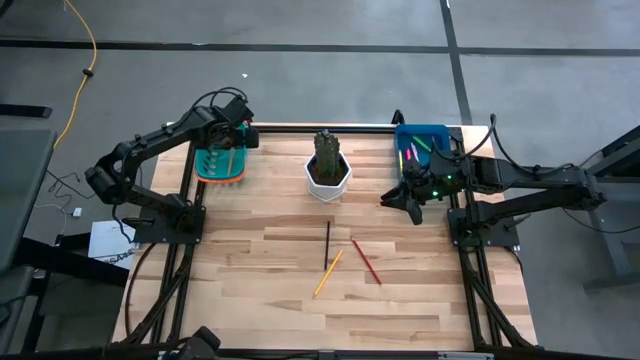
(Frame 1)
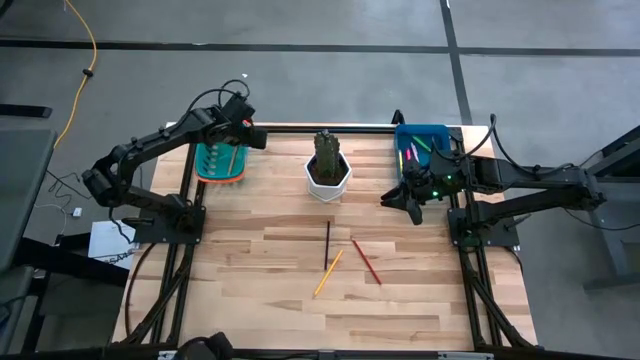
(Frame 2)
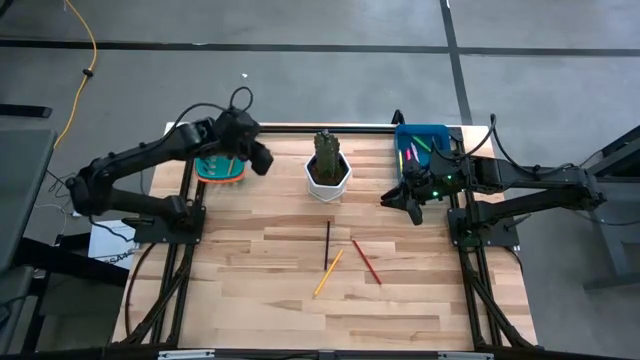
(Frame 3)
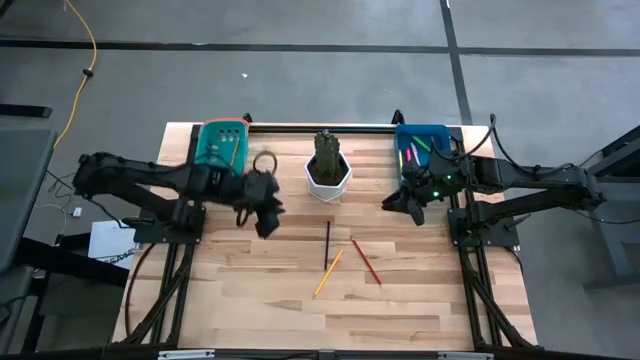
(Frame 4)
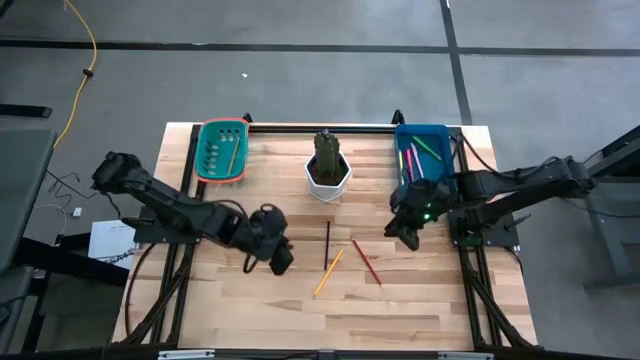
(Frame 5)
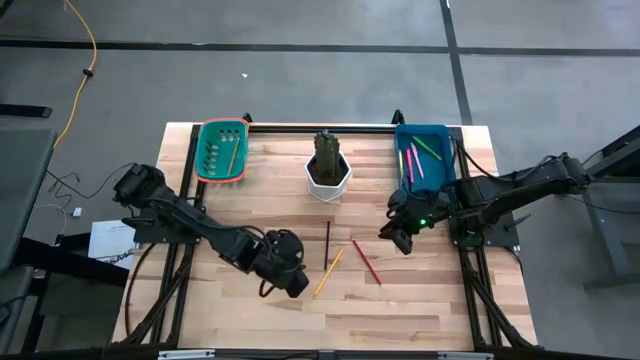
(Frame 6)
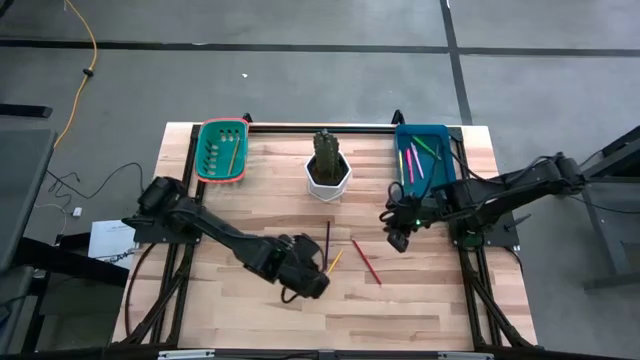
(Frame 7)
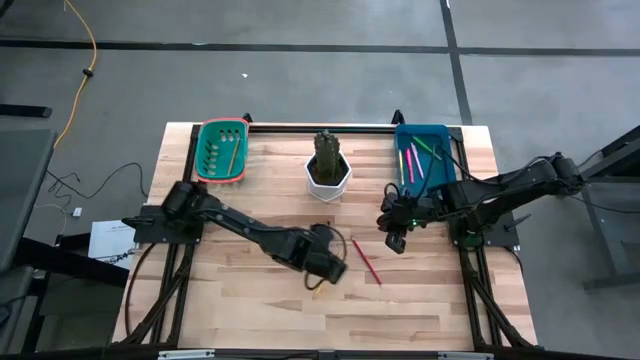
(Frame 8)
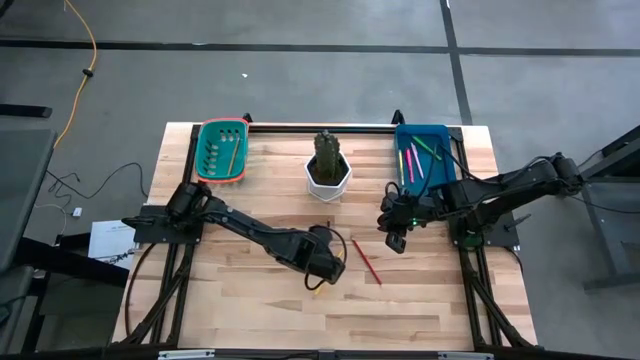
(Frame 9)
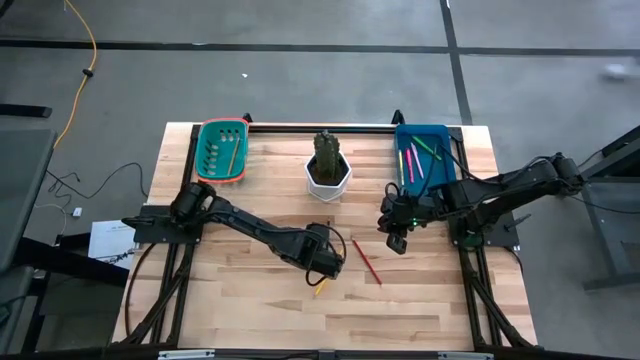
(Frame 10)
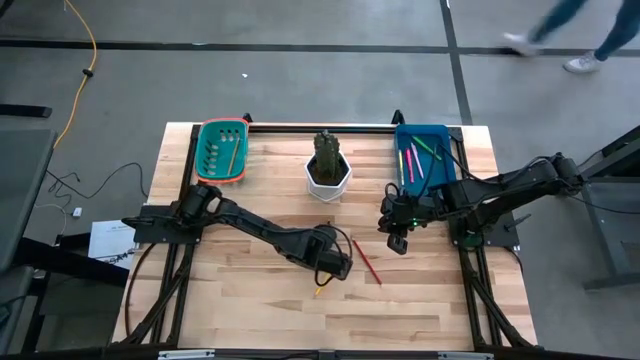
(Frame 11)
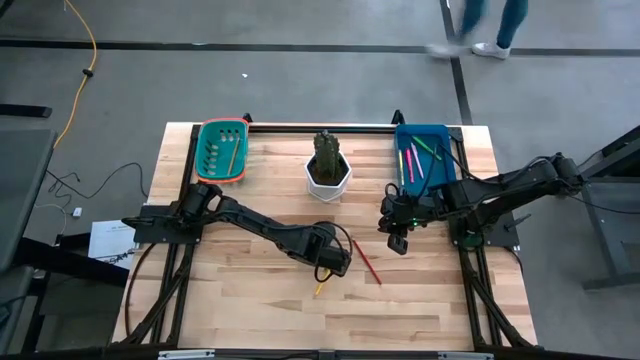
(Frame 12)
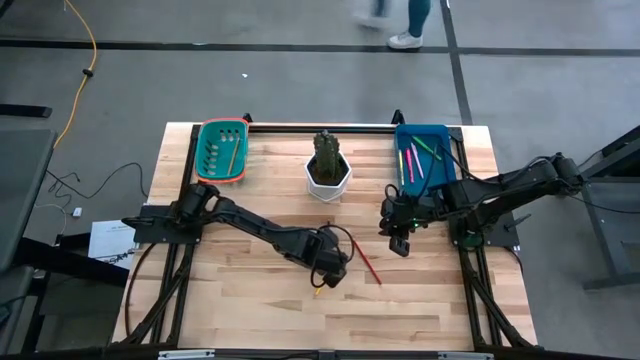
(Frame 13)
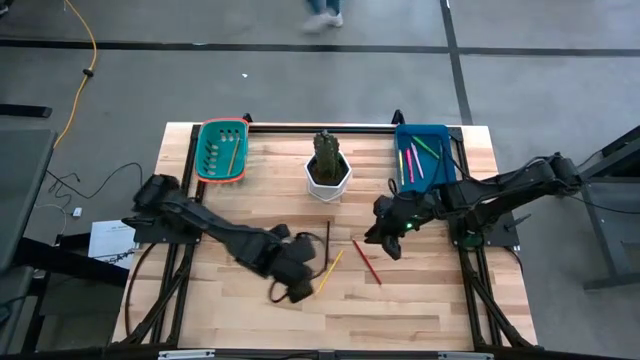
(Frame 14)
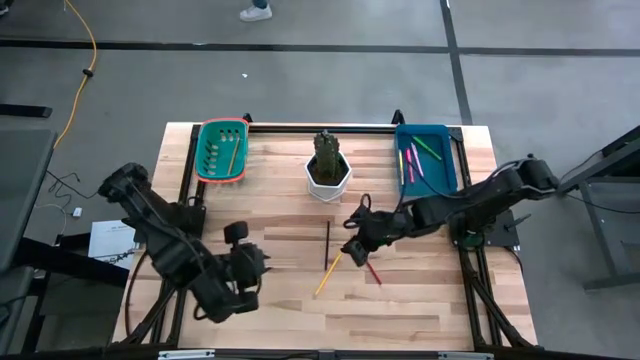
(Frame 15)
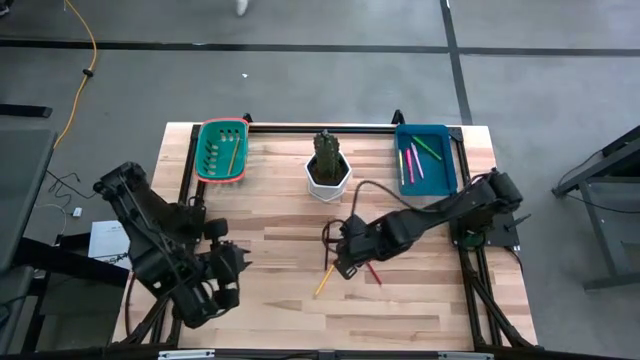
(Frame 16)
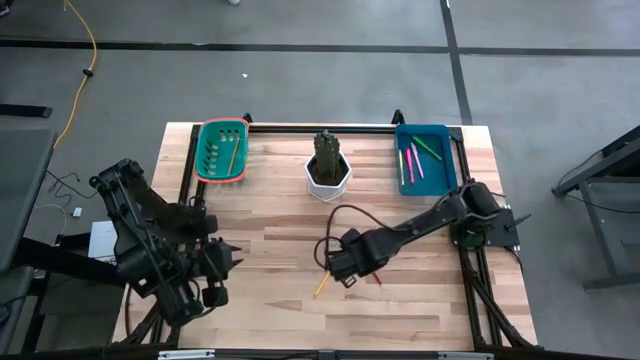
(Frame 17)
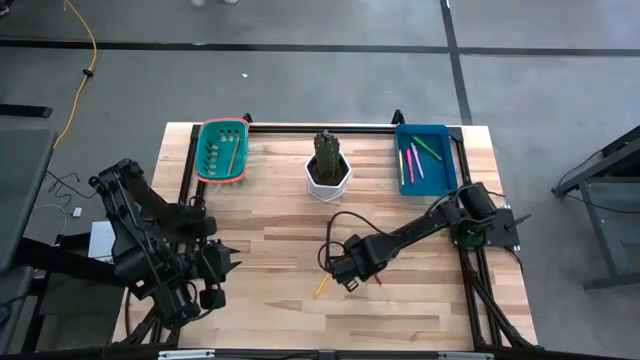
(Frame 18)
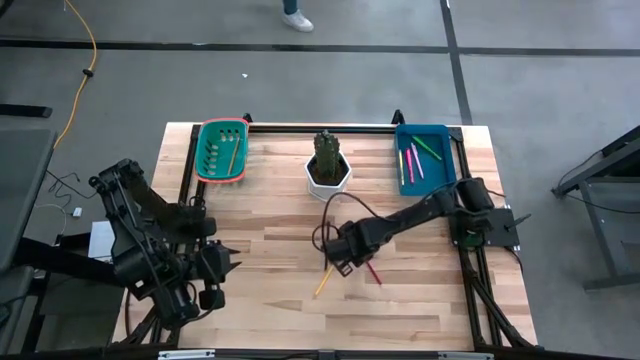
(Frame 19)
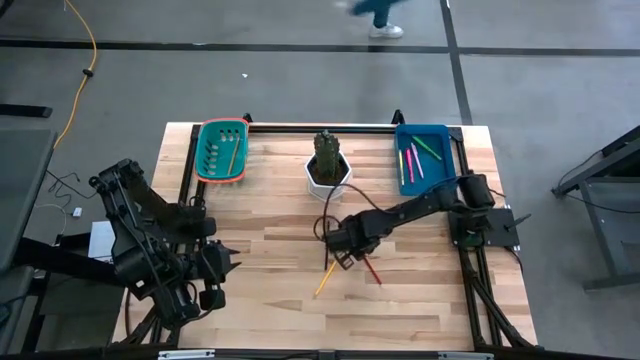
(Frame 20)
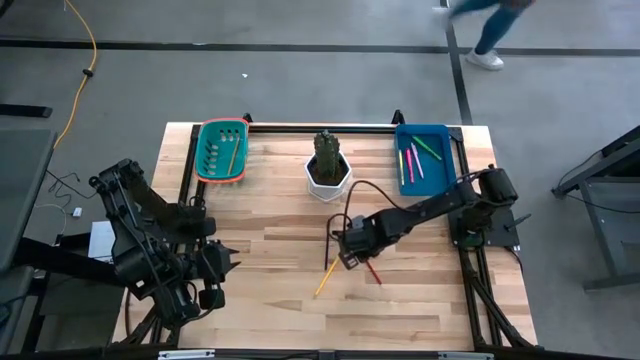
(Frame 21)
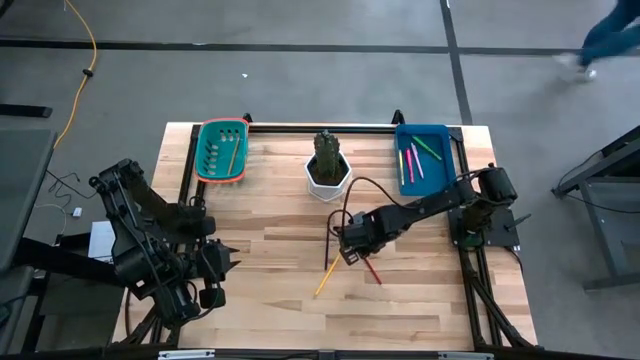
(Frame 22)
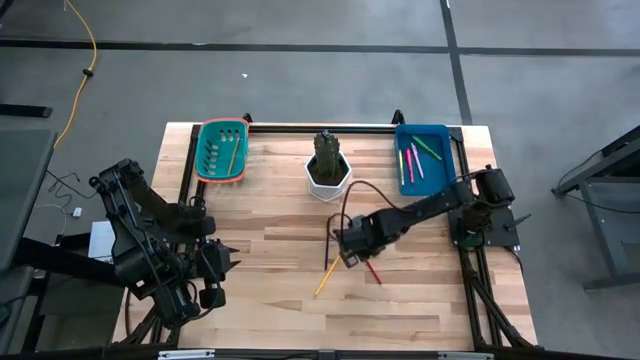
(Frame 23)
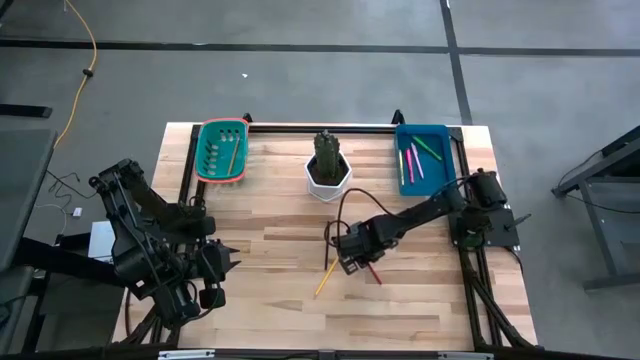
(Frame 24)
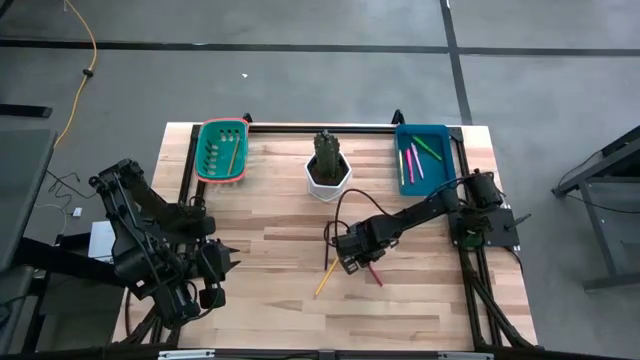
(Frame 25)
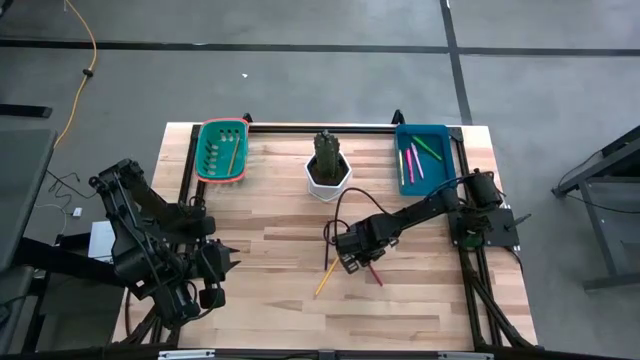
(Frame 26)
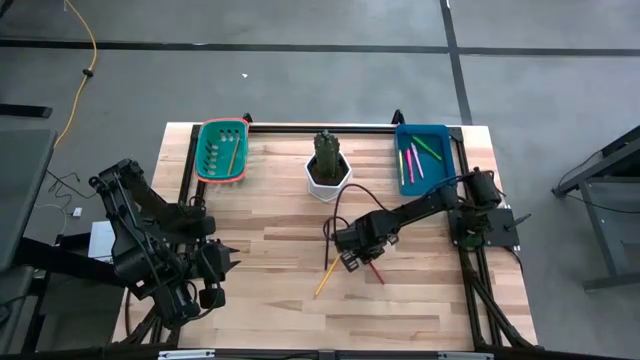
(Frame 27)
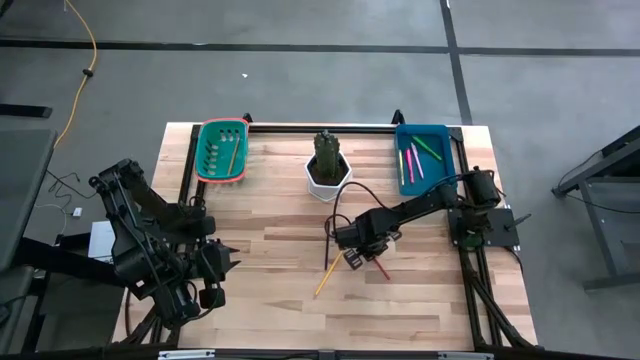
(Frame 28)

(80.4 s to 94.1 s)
Task: Sort pens & pencils
Put the red pencil into the green bin
